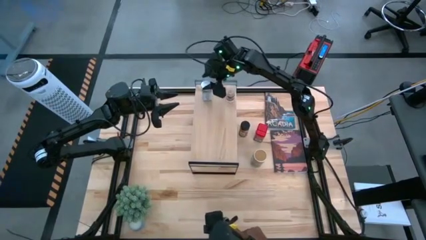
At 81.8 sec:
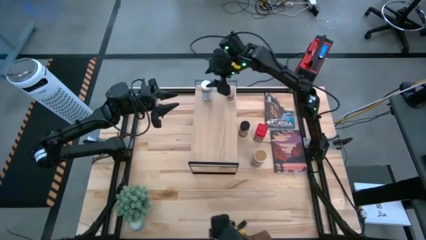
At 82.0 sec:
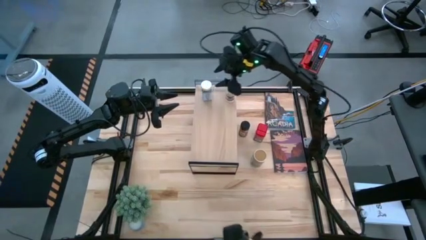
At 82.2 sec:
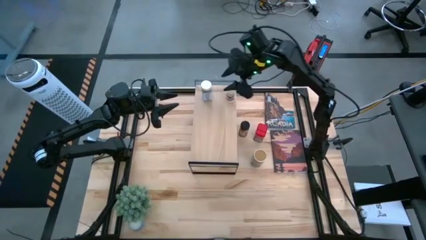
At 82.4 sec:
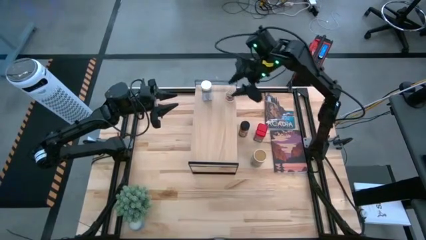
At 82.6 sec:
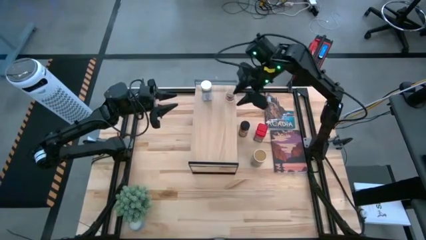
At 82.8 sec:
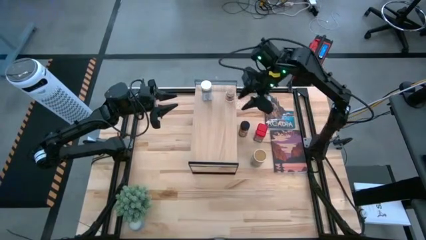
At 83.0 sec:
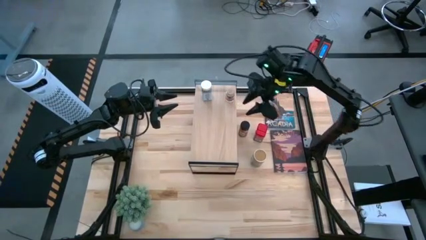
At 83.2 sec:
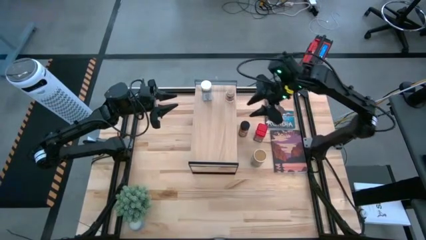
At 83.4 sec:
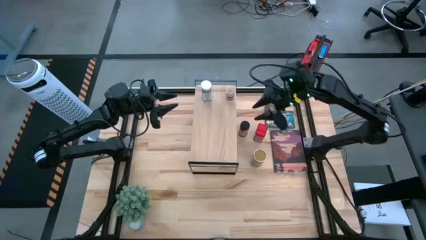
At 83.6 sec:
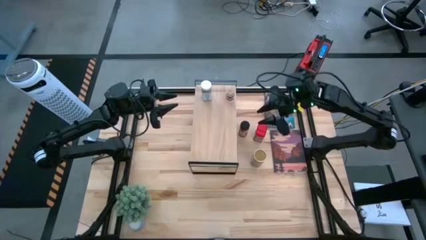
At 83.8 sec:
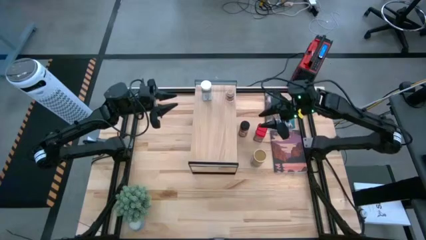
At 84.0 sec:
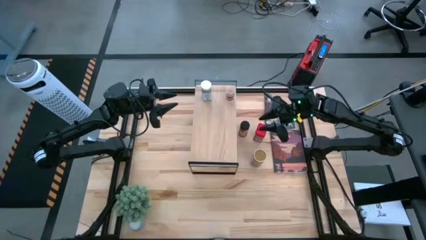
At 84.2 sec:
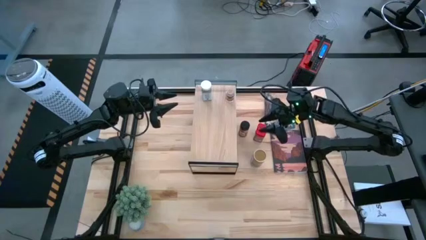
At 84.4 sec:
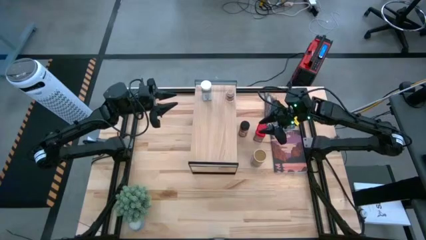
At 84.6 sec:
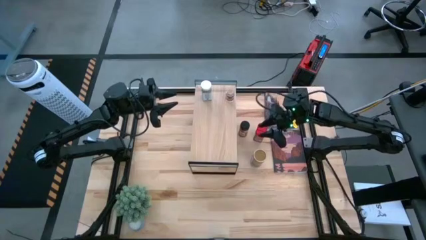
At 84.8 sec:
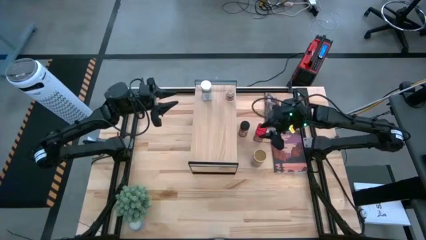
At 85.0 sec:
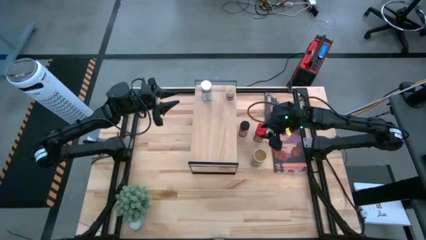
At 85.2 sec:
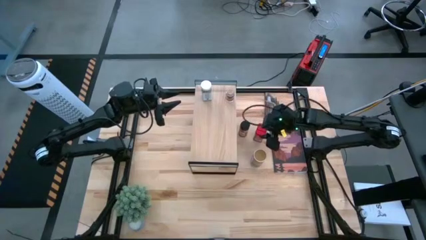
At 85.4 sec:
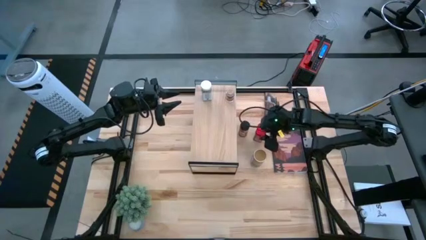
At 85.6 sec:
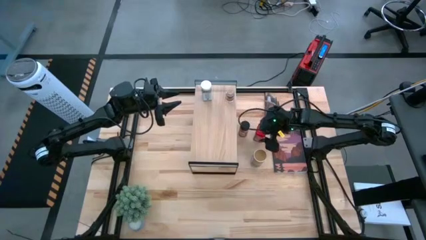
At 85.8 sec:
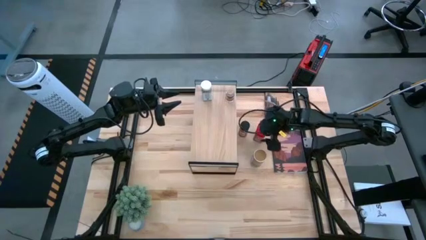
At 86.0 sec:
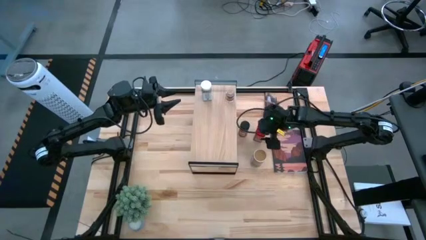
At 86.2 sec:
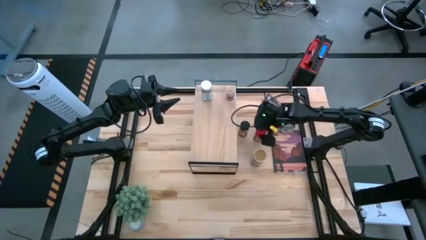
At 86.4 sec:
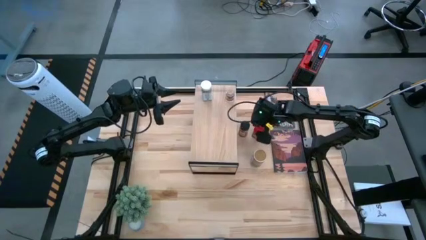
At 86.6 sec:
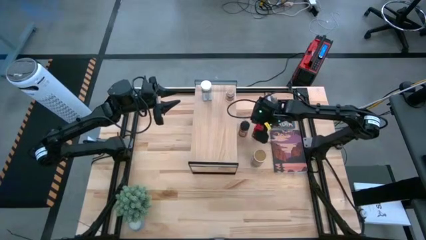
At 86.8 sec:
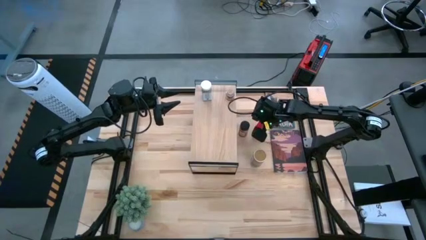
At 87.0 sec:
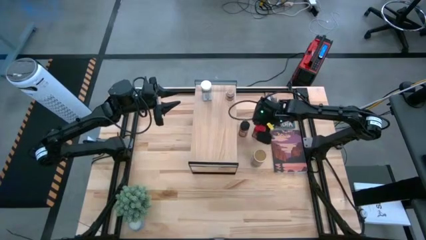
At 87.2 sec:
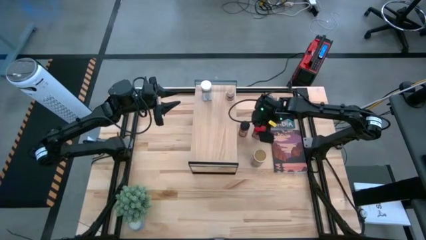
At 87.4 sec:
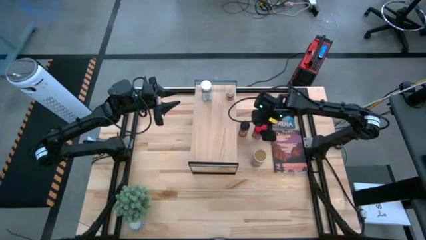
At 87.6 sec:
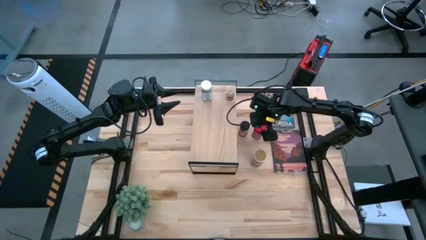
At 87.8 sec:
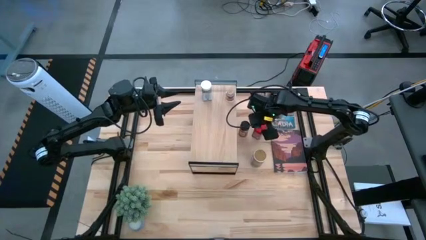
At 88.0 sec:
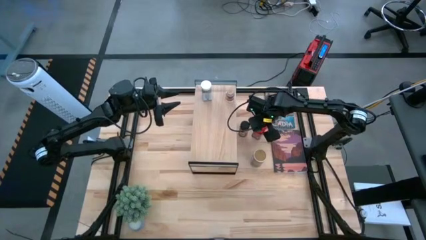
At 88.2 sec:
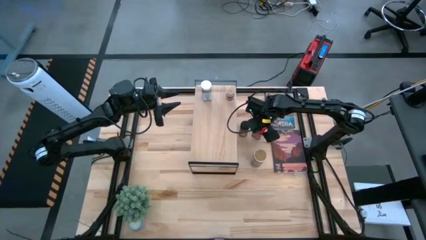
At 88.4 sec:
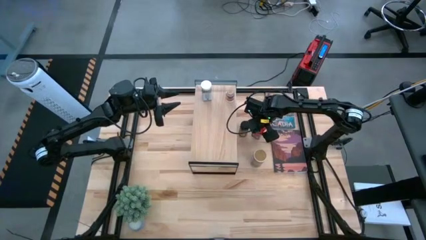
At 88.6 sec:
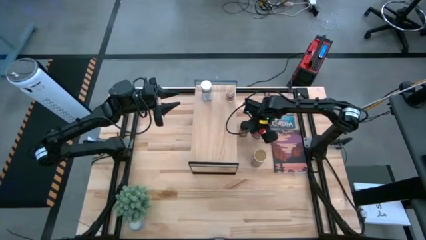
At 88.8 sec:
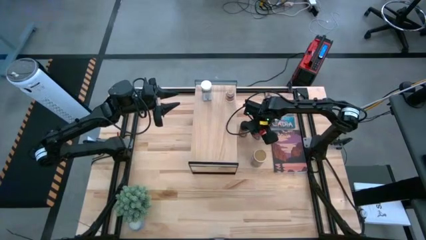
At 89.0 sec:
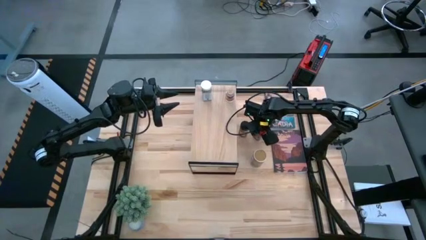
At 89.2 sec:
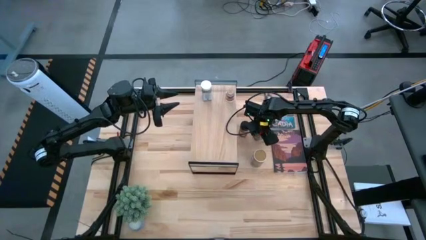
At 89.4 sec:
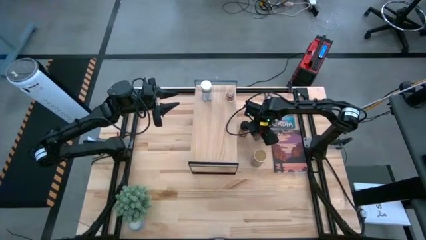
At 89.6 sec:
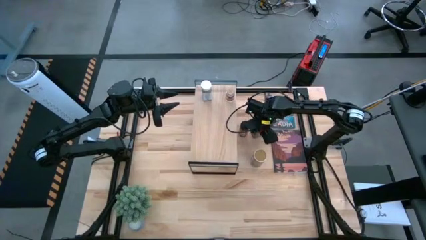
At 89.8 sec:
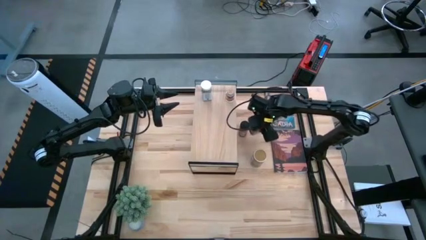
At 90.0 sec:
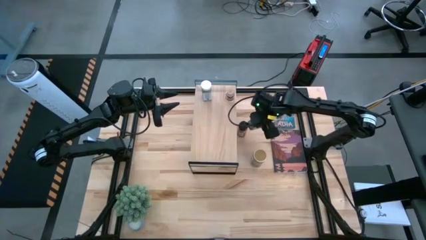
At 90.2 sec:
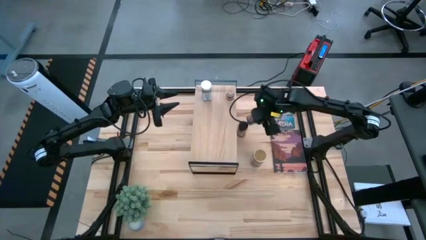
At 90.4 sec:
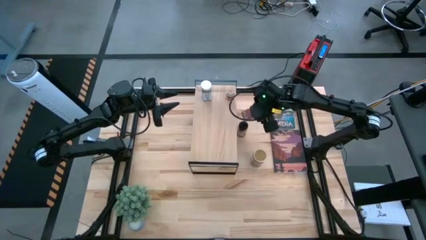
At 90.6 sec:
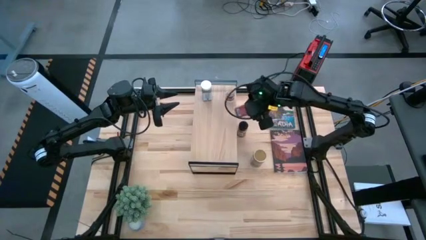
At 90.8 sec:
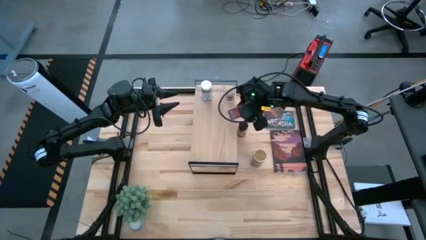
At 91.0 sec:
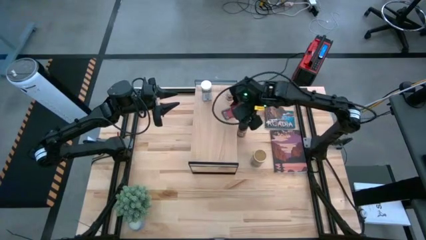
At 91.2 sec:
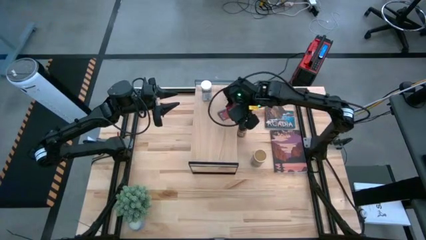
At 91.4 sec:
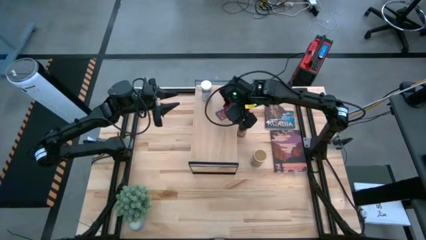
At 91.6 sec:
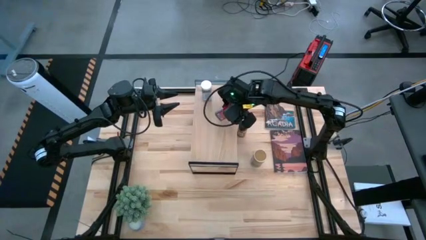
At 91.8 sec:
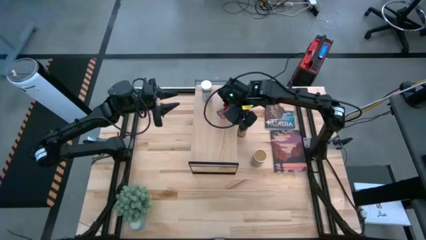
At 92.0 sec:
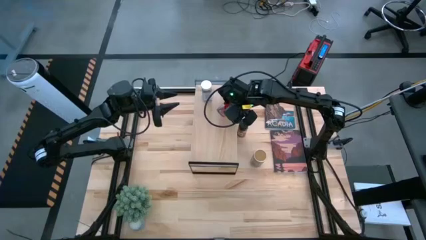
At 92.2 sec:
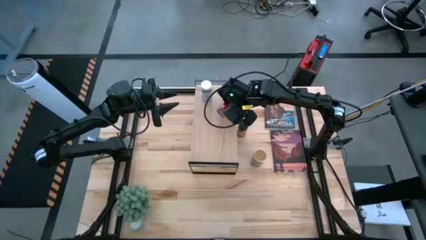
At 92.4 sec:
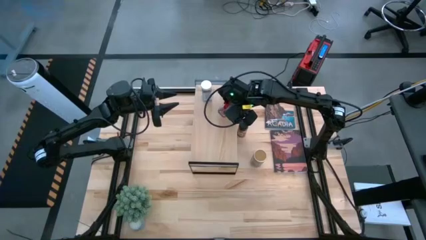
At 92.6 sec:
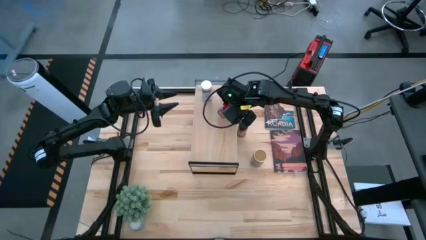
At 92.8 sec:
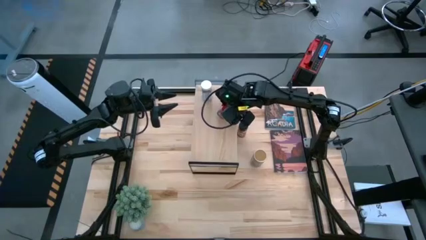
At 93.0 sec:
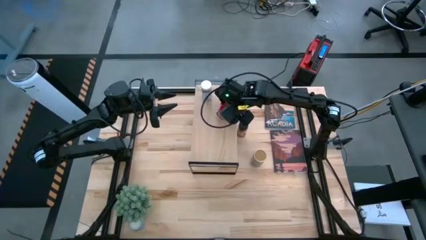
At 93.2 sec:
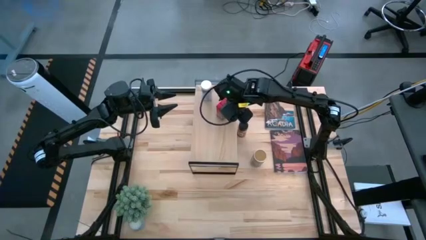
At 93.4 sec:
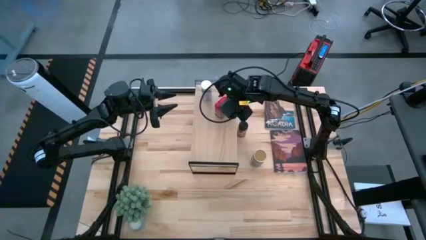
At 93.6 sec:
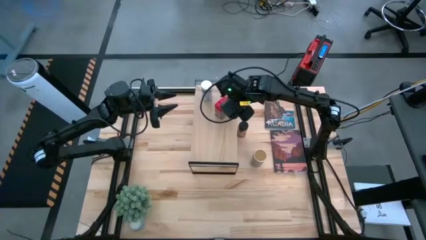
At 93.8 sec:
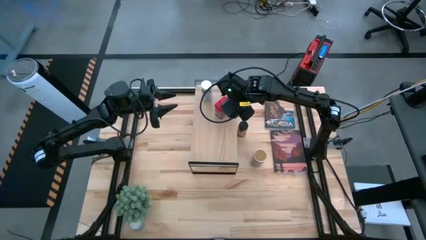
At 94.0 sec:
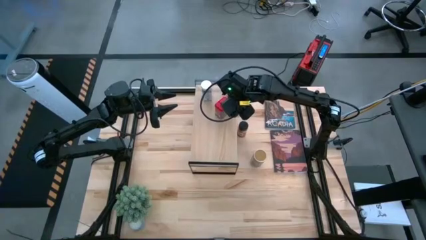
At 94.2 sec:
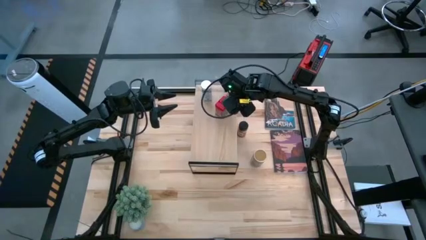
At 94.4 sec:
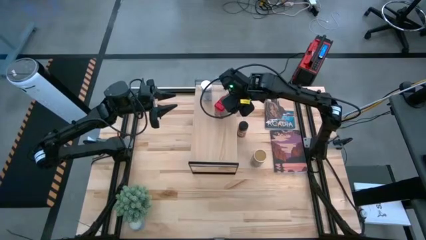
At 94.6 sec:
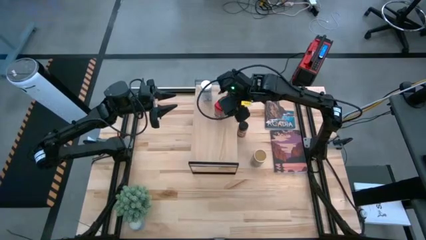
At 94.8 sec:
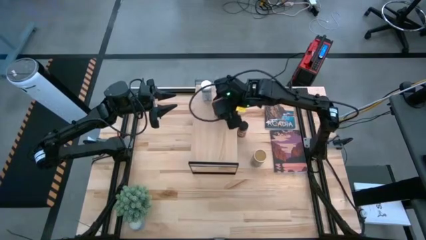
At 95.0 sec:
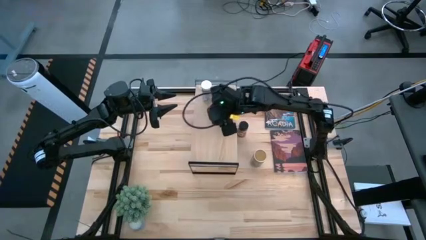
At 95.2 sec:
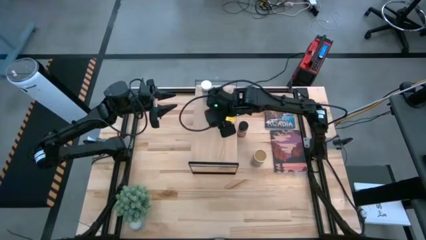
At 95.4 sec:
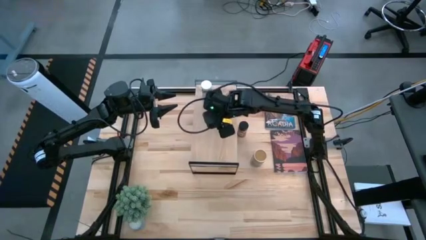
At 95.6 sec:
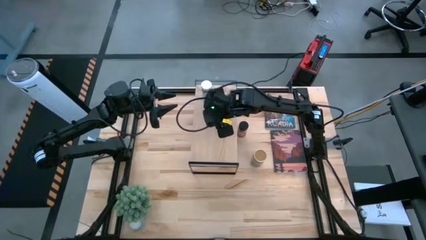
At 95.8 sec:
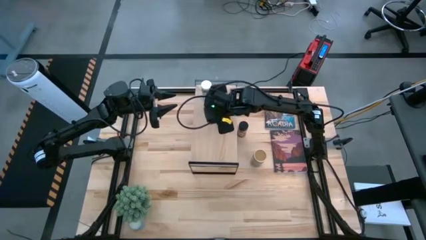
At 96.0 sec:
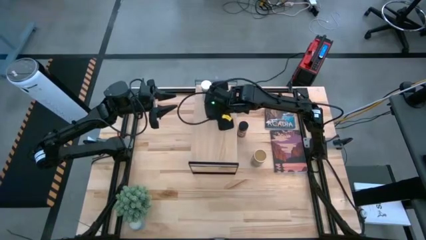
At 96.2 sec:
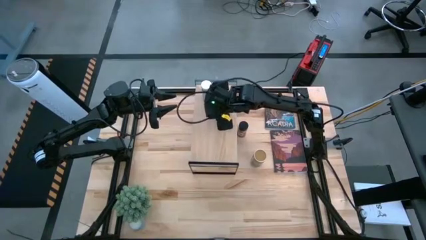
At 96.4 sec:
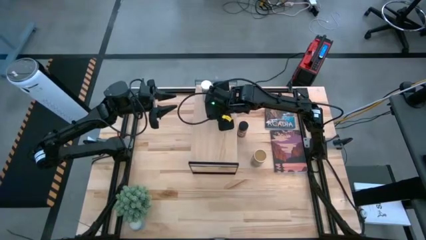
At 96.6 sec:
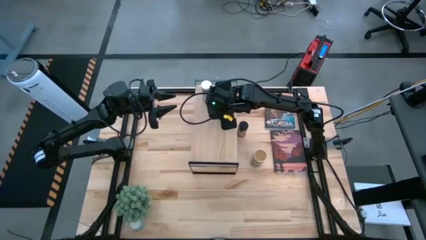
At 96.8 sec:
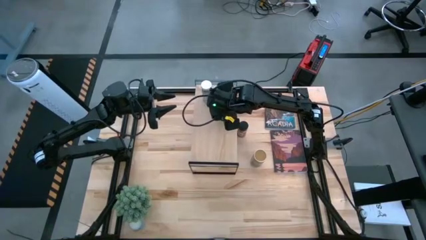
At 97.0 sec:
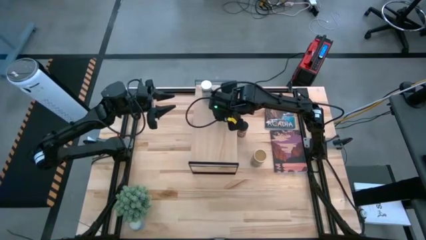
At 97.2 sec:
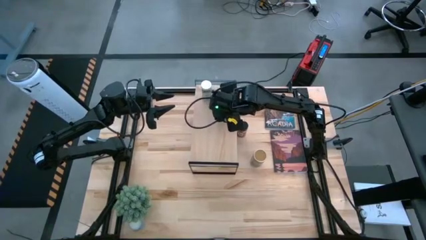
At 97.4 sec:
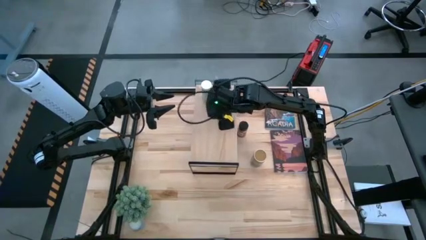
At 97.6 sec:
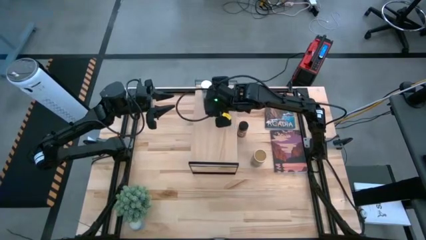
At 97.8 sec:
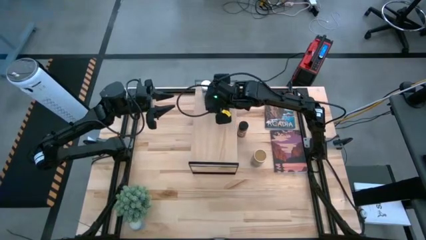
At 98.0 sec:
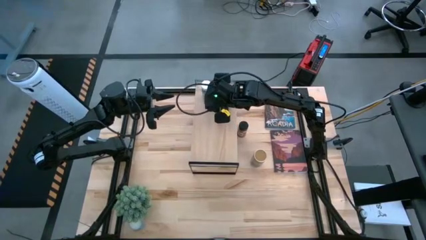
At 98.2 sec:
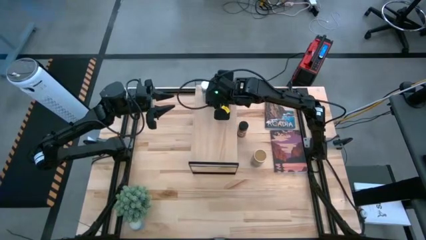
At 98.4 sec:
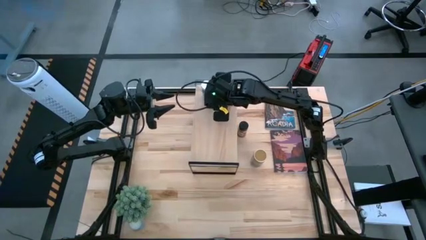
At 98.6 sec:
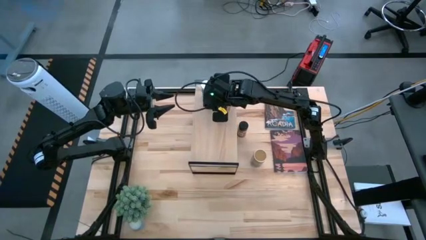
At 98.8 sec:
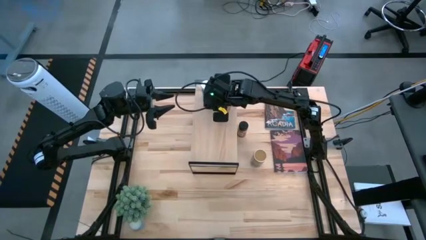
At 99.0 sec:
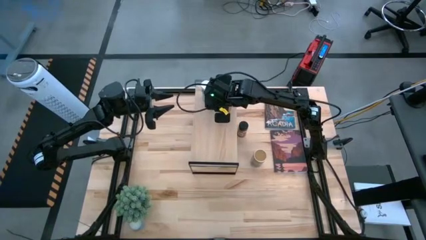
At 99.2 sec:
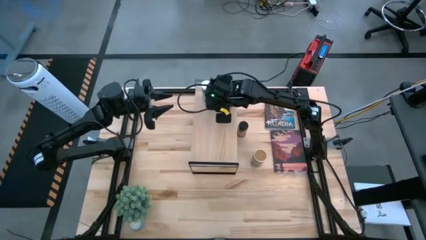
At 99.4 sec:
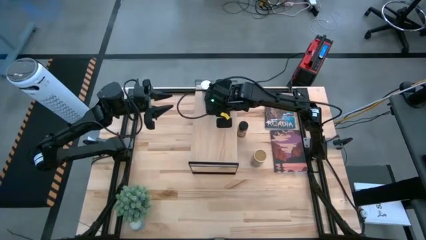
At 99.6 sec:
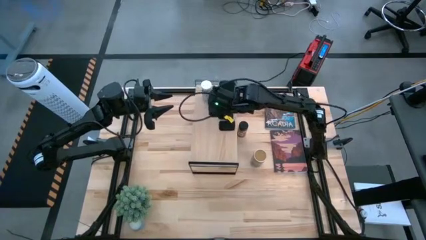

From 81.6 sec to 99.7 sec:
Task: Shelf spices
Put the red seasoning bottle on the shelf

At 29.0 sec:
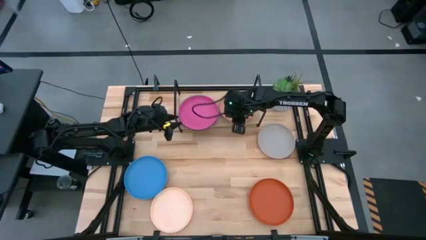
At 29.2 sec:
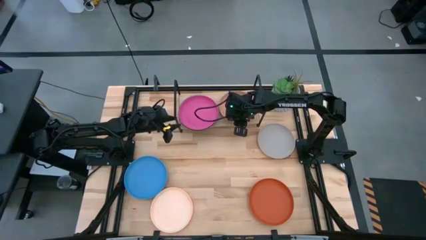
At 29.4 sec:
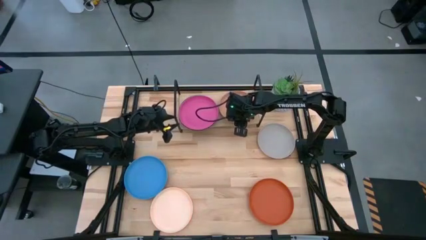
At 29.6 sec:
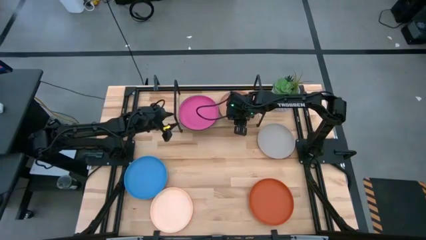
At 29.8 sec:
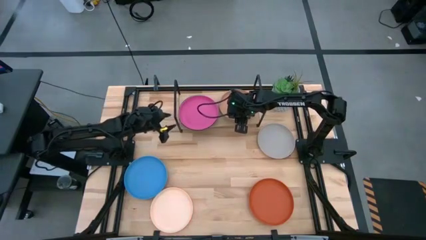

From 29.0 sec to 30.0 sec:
Task: Place and stack plates onto a shelf
Adjust the right stacked plate on the shelf
